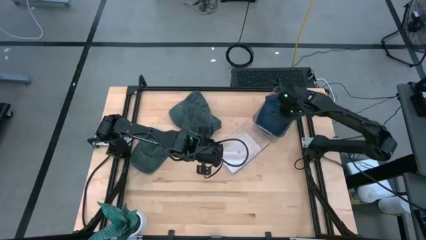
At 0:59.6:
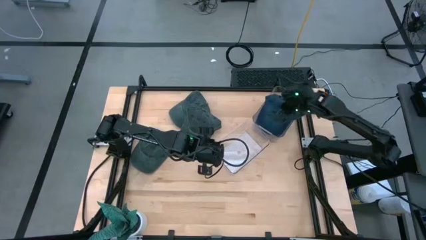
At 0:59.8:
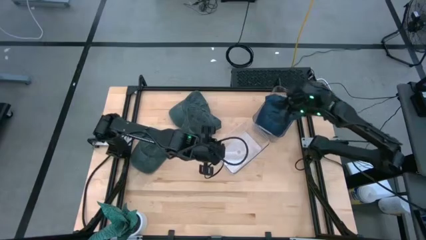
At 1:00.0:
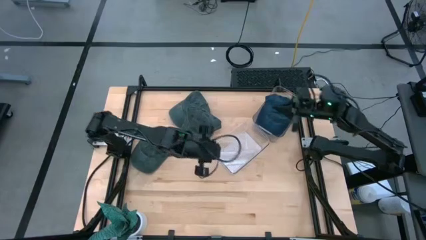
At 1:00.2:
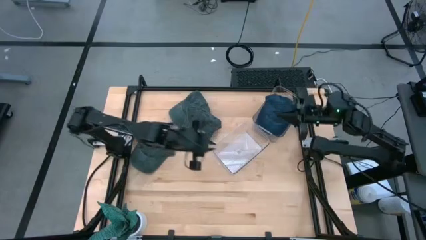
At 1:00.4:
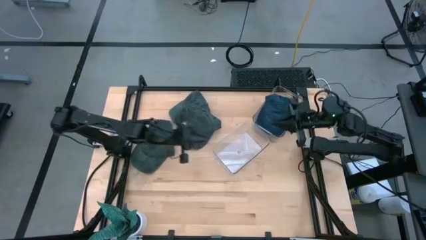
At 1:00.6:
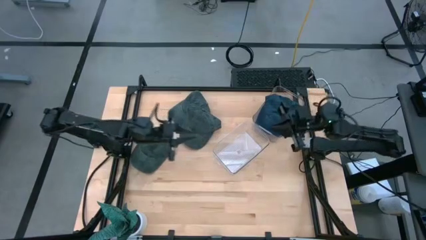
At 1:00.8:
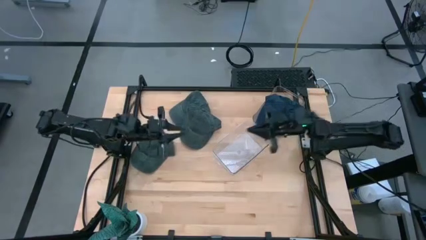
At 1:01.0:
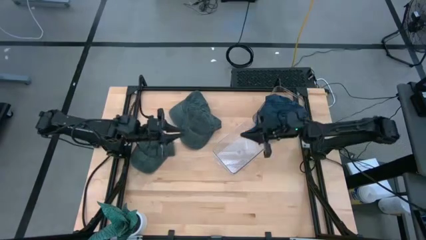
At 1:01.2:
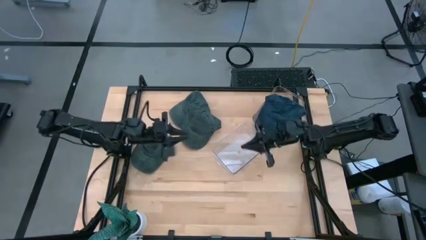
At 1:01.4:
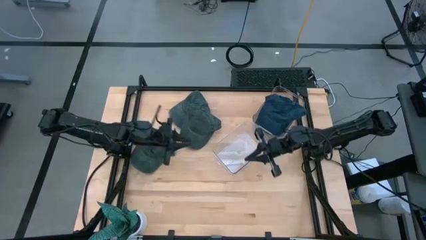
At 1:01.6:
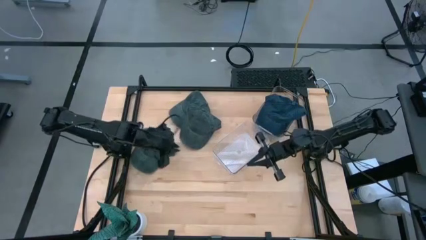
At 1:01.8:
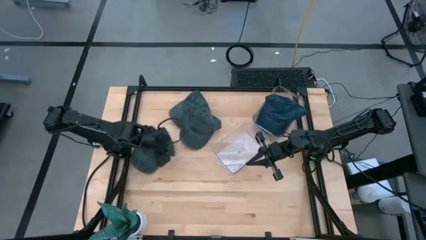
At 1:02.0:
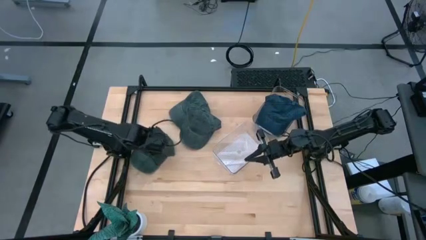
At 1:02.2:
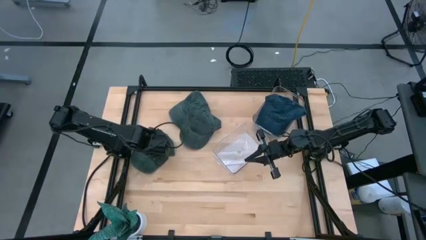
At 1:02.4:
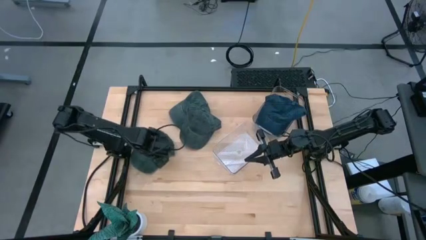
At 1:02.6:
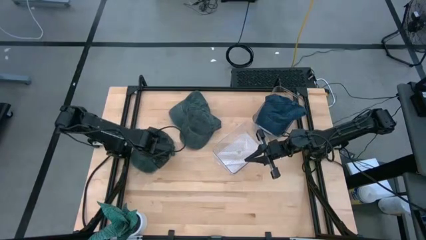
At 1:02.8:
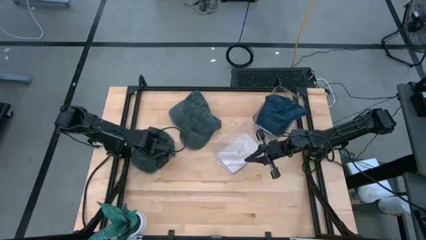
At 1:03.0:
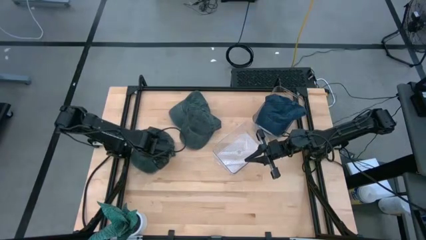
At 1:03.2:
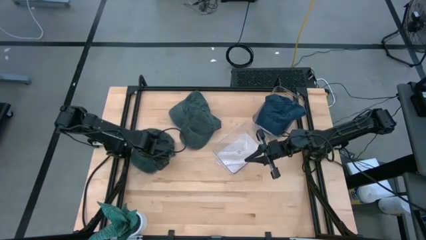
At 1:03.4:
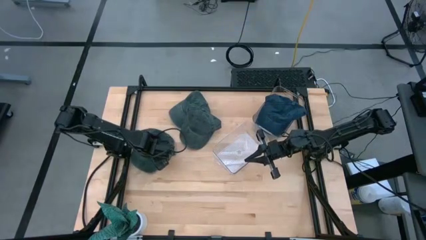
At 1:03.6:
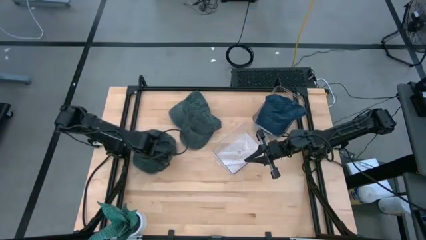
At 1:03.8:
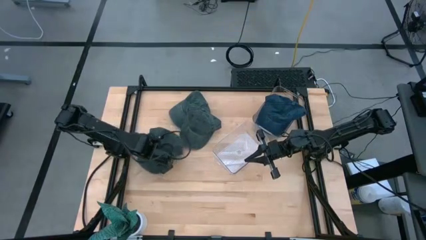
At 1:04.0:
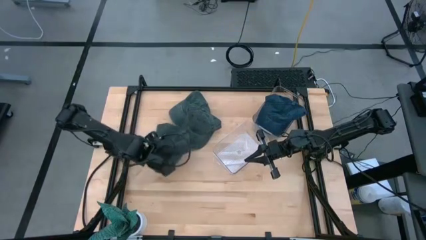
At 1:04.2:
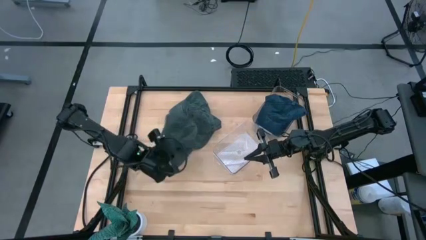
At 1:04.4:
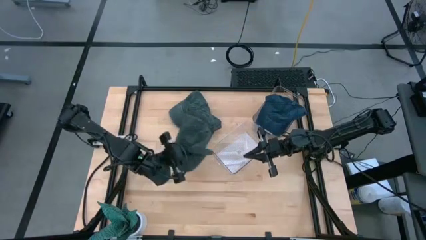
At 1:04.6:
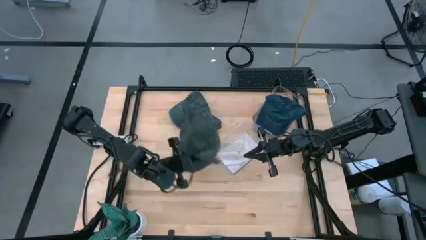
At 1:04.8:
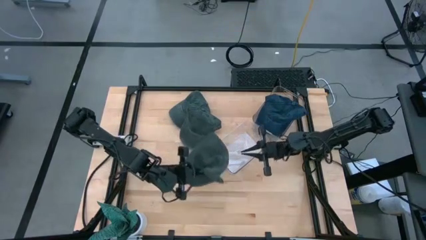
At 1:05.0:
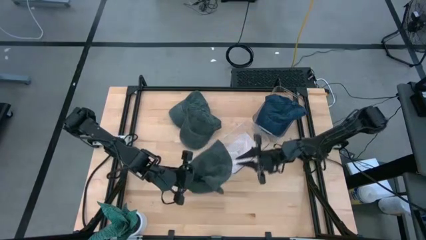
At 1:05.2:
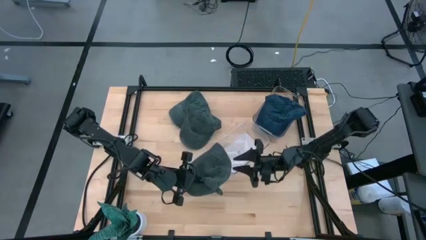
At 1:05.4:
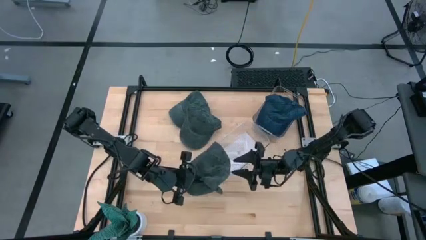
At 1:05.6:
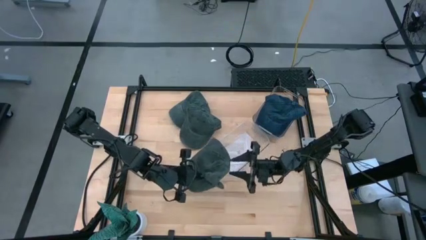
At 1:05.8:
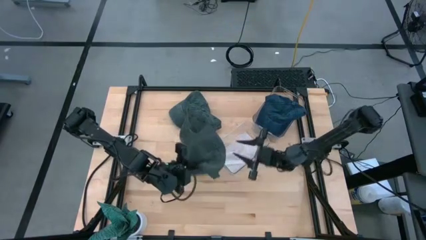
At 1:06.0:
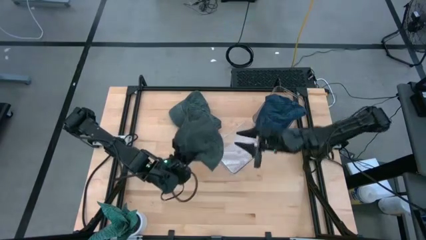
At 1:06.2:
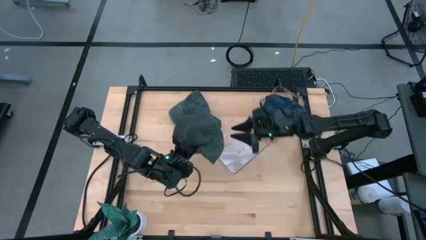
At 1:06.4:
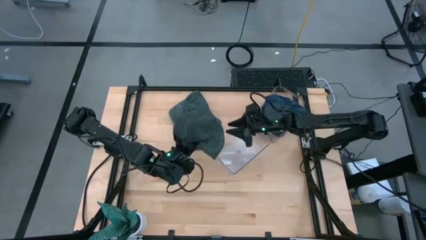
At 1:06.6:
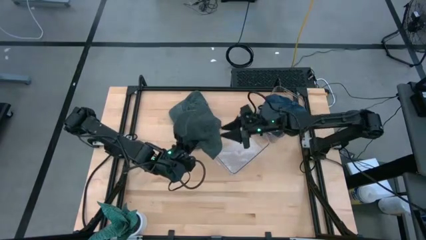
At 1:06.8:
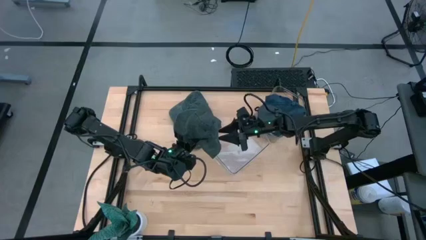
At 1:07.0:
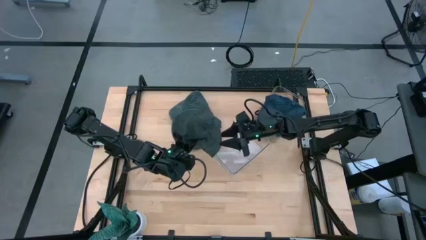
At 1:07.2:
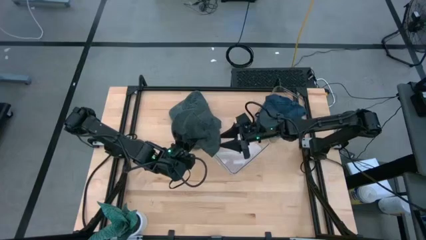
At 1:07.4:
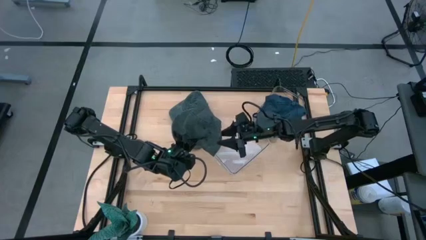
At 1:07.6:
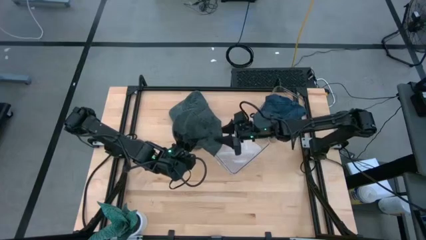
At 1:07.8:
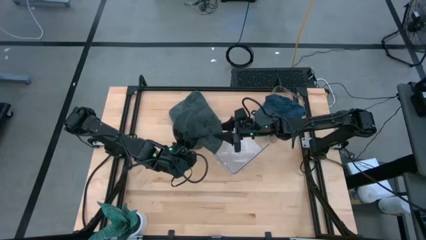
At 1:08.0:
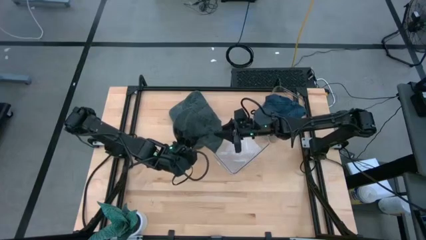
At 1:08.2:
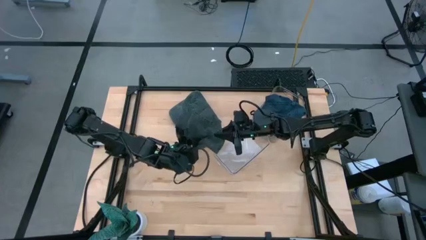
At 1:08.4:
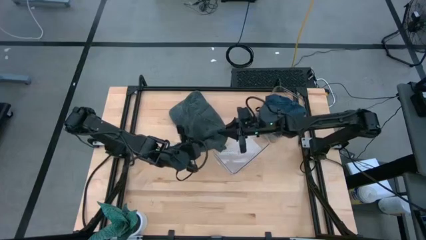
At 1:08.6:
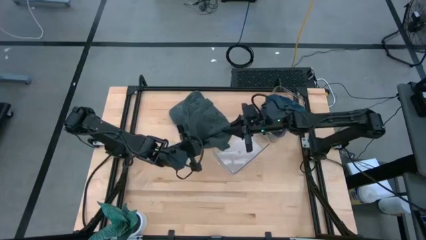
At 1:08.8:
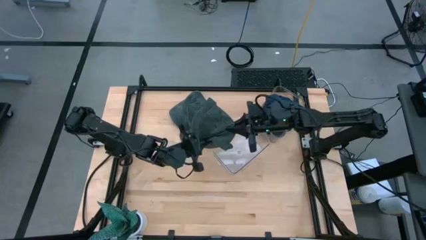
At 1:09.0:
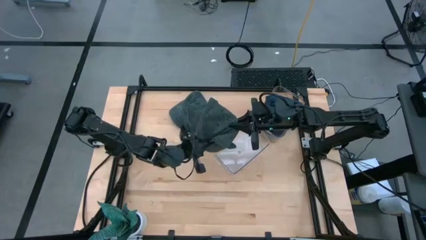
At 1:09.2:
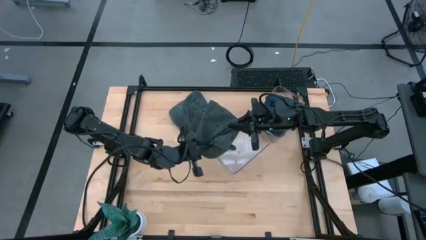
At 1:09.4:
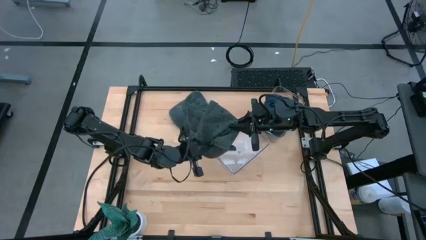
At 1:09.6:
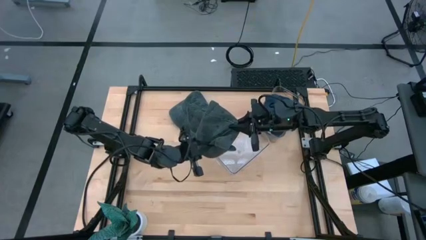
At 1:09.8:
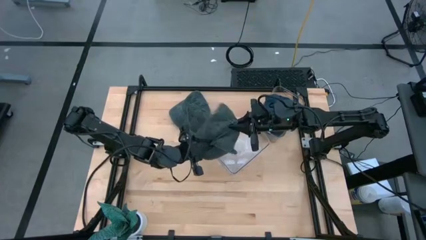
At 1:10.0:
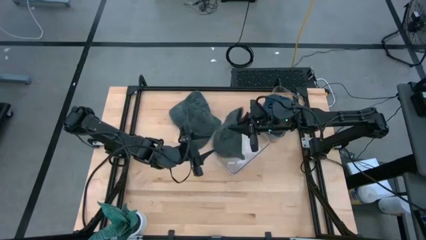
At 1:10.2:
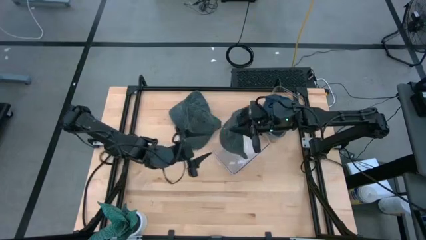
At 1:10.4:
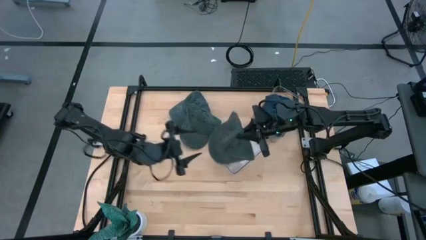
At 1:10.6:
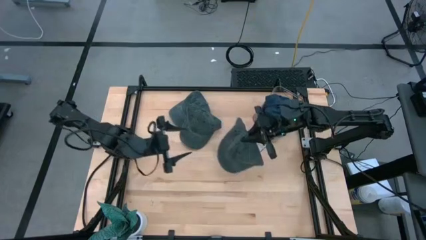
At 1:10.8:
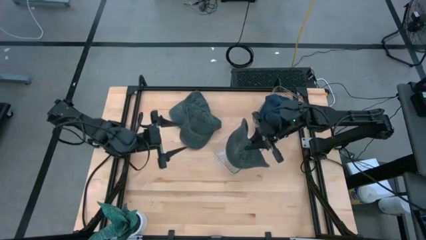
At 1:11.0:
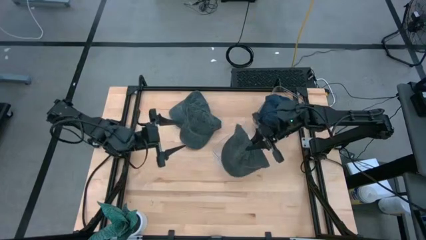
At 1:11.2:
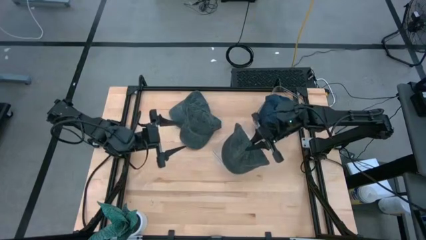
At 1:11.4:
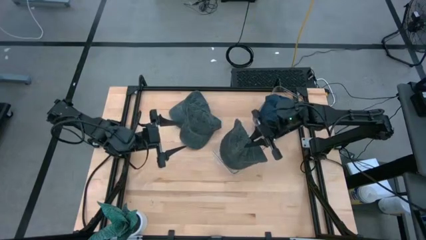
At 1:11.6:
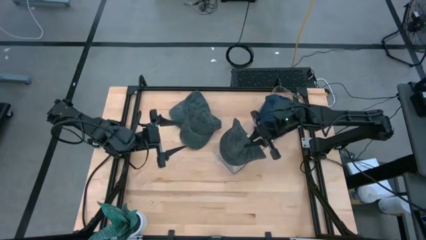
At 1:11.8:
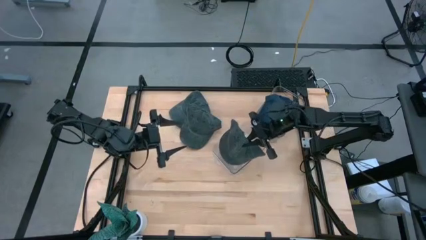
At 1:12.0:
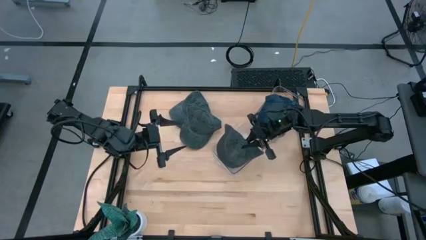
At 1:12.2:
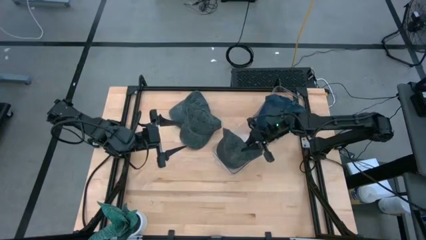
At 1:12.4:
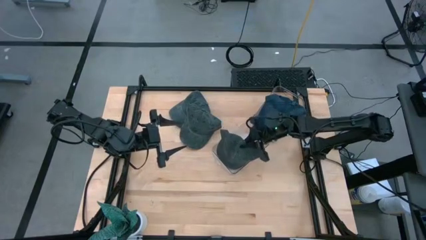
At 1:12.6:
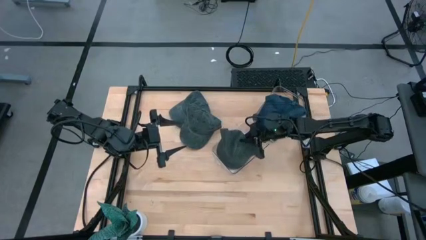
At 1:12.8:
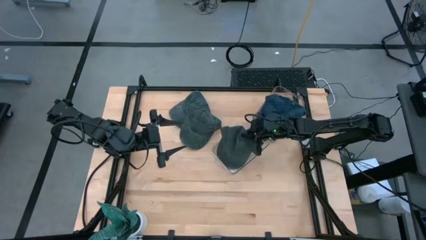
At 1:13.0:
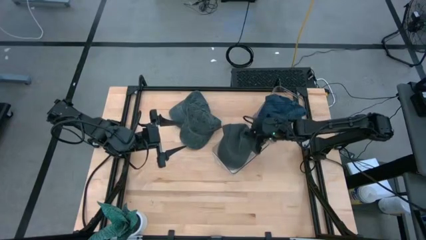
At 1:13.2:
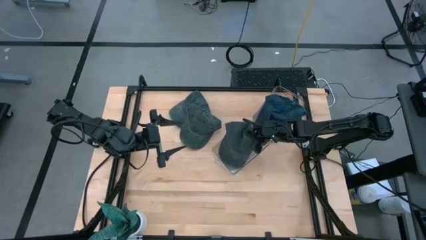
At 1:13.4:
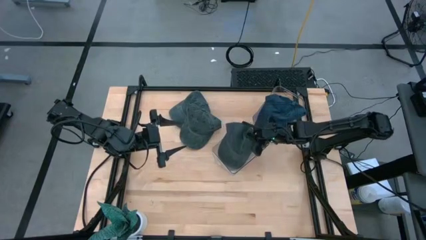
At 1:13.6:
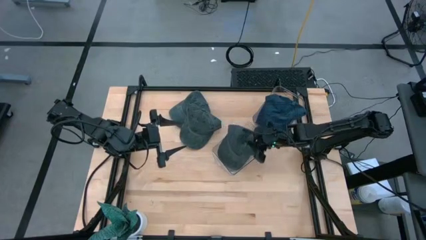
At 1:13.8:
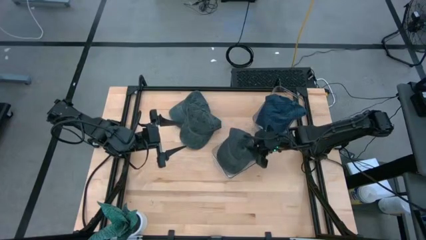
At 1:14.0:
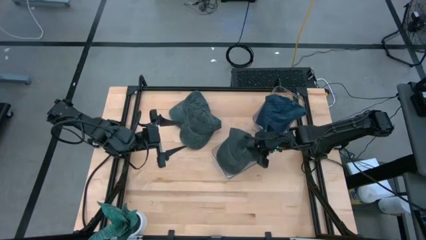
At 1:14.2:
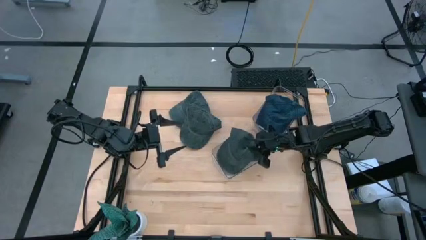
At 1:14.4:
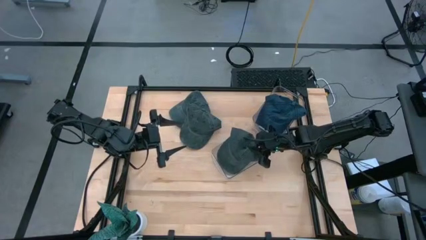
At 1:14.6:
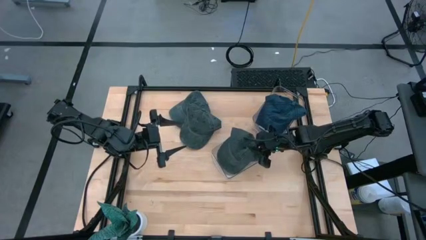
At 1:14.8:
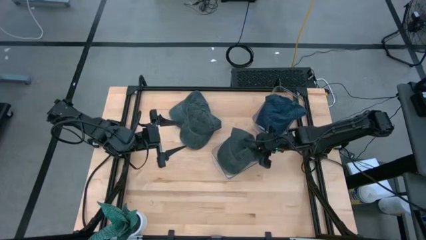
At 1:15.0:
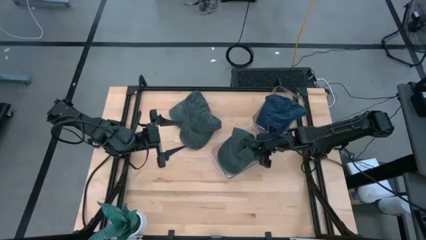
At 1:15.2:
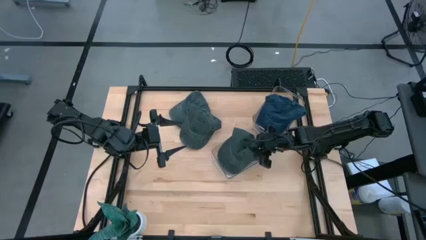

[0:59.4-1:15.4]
Task: Pick & Place hat
Put the bottom gray cap into the bottom transparent bin
